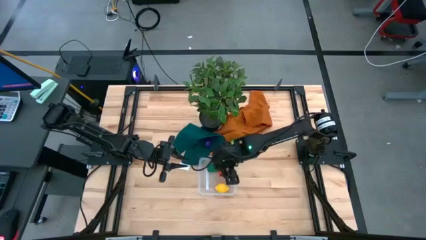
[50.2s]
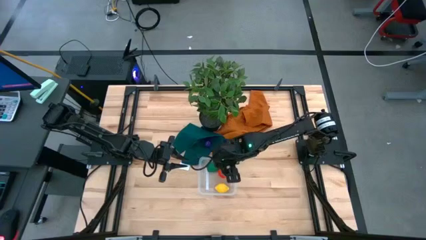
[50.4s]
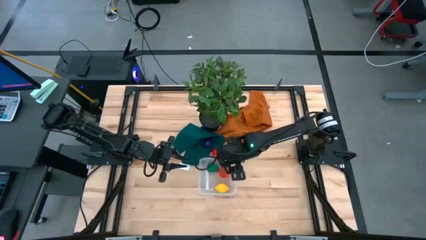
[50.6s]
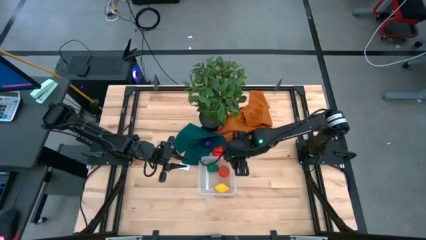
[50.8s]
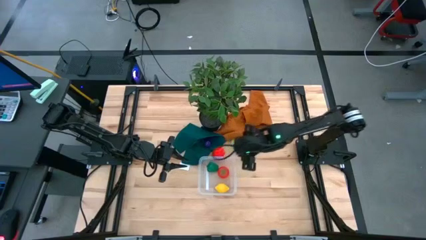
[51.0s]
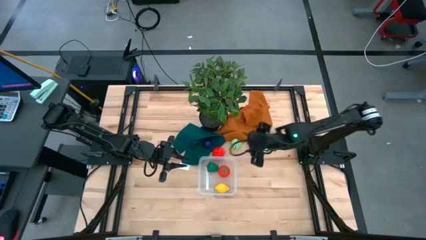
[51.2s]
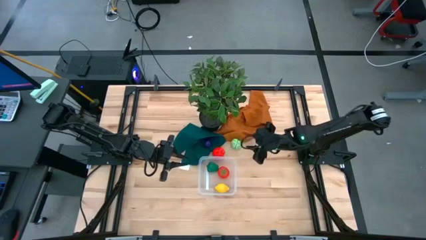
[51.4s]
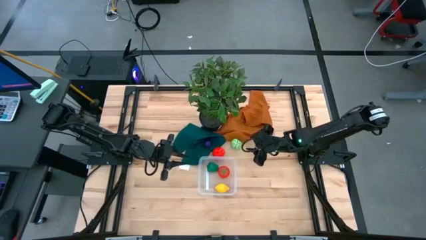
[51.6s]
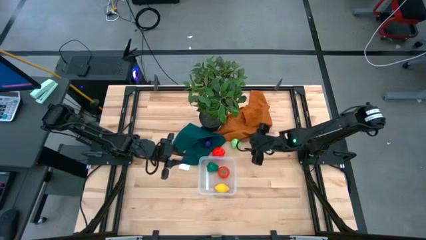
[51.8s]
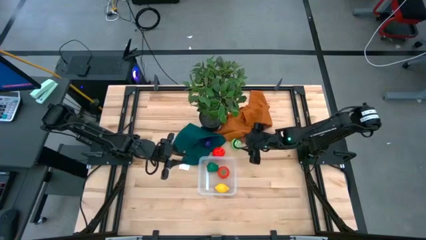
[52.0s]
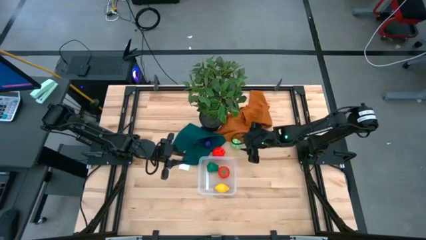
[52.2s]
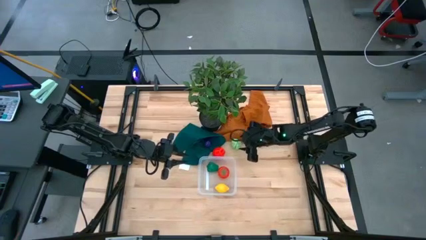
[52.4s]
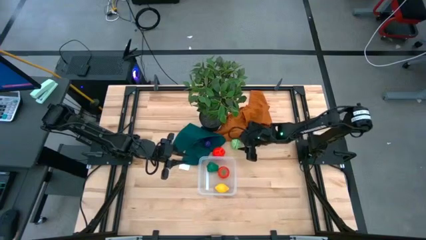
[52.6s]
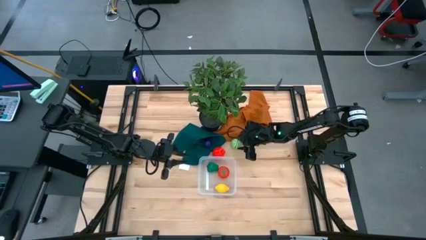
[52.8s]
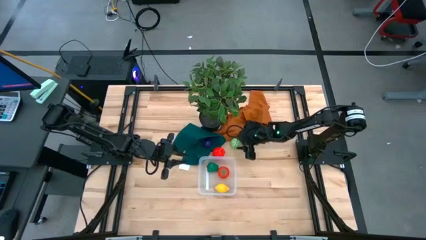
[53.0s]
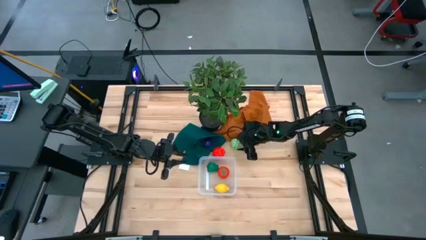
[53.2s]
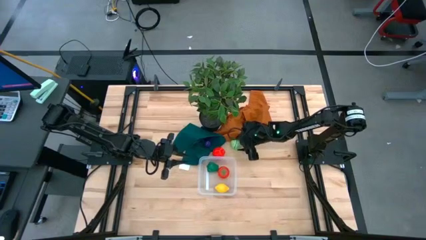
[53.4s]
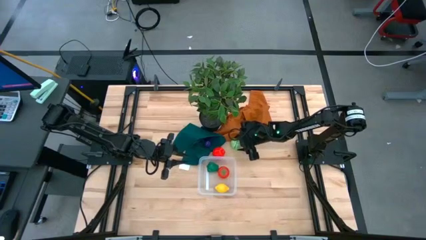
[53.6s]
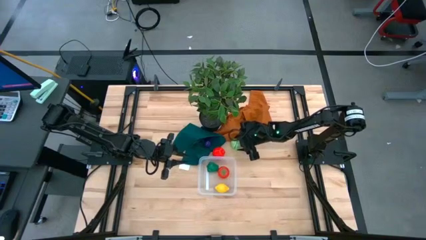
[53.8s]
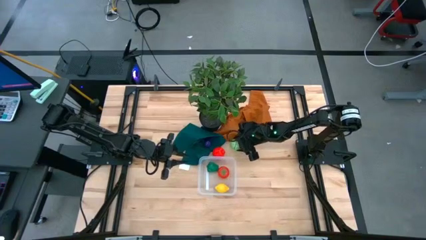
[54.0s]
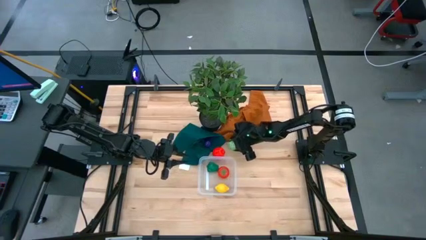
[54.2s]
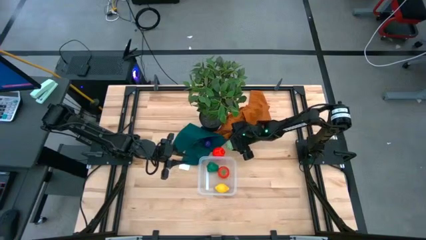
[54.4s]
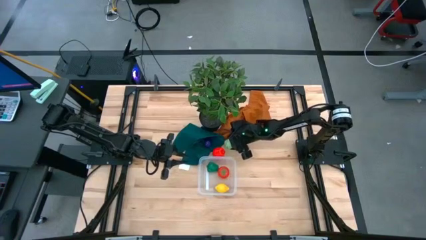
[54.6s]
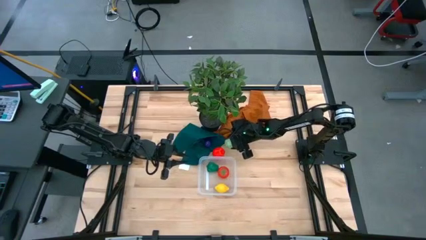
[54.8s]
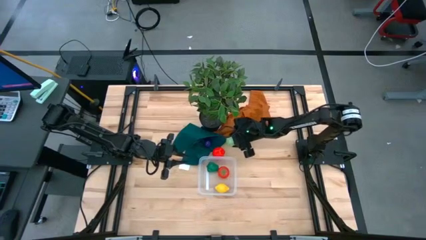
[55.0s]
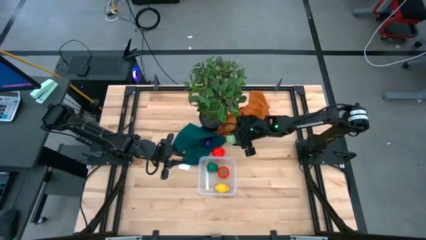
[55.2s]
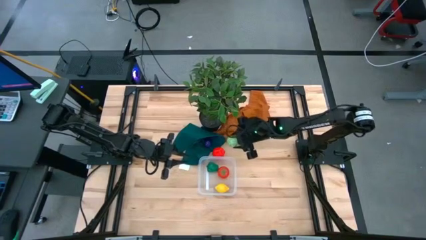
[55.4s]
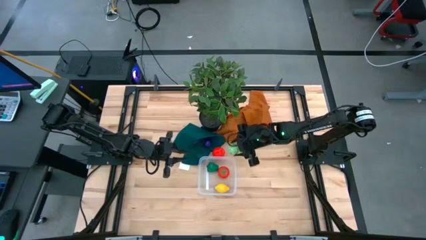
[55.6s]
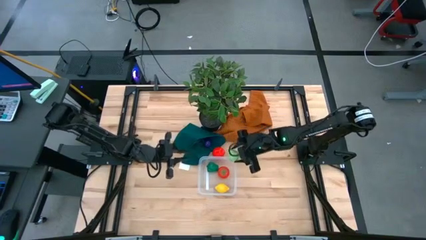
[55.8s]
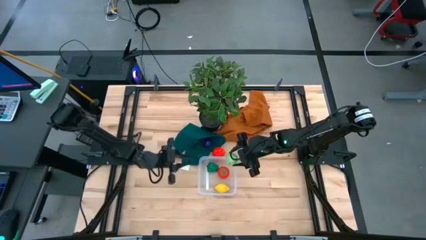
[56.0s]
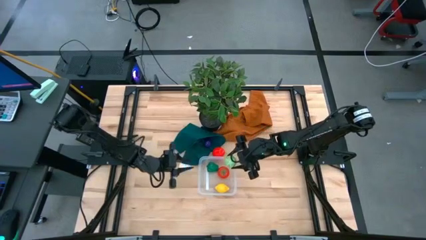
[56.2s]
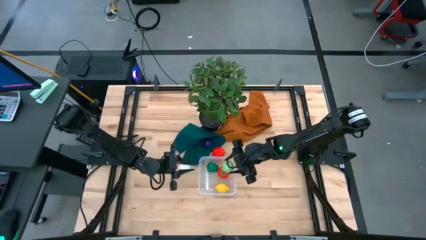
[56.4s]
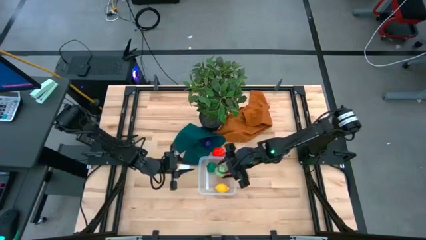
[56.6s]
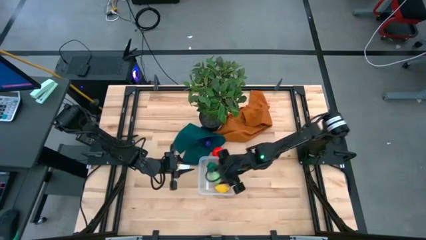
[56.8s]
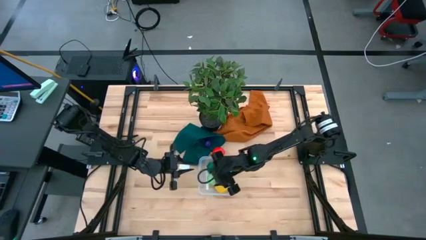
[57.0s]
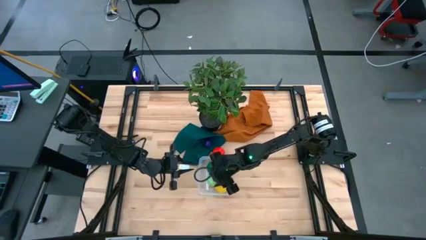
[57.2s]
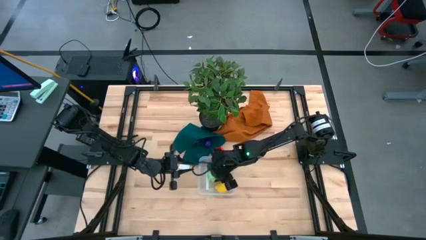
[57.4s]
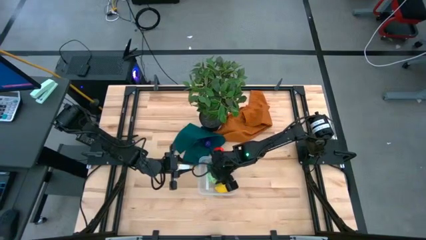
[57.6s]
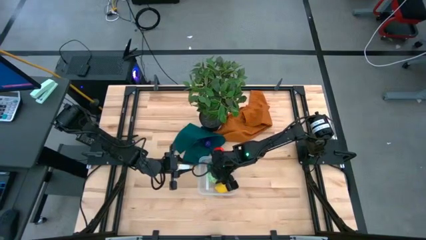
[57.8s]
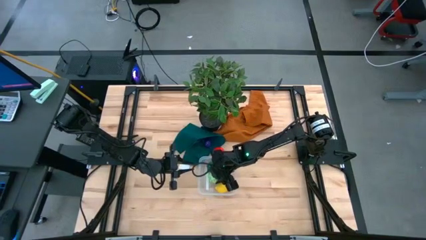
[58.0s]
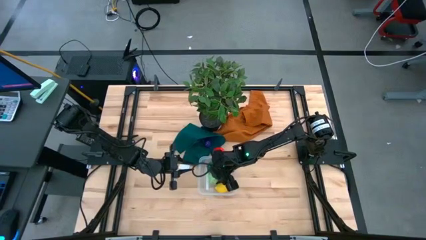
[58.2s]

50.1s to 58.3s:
Task: Pick and placing Produce into tupperware
Put the cabbage into the transparent bin

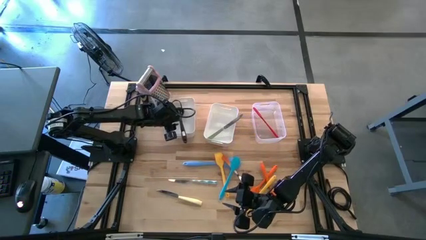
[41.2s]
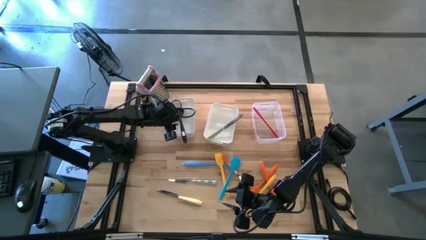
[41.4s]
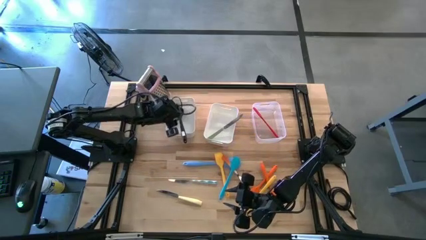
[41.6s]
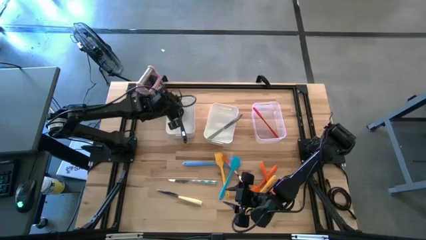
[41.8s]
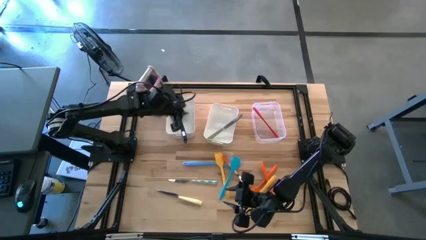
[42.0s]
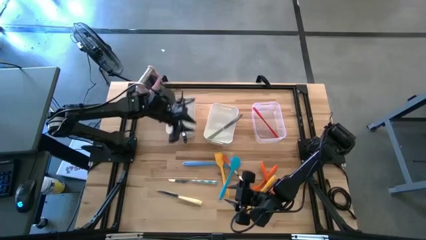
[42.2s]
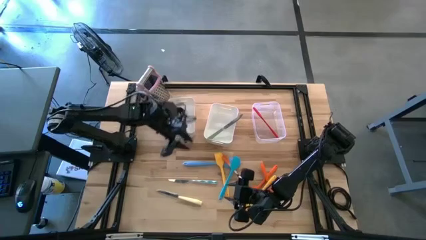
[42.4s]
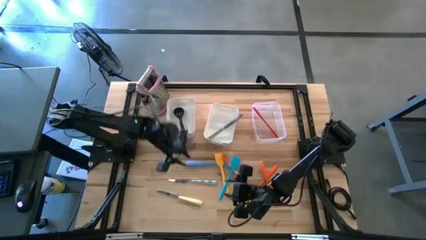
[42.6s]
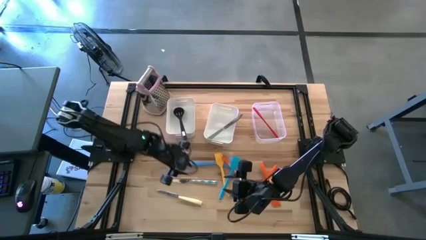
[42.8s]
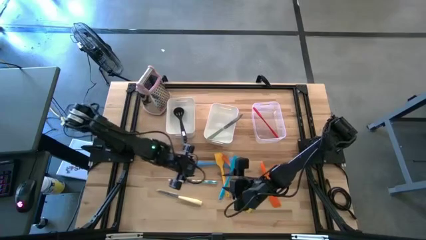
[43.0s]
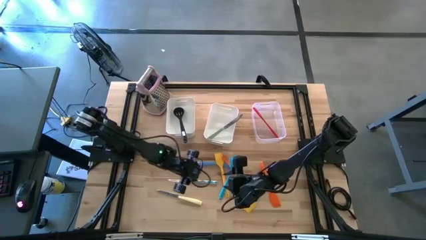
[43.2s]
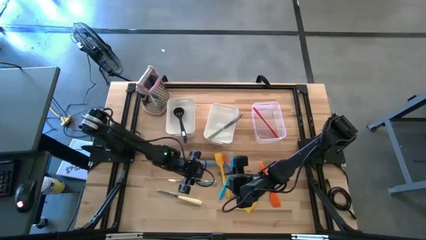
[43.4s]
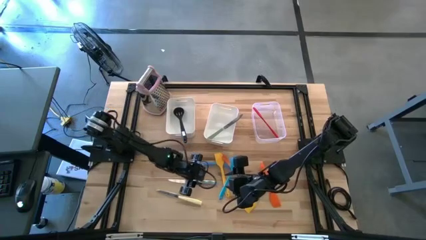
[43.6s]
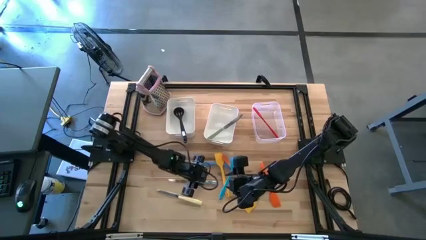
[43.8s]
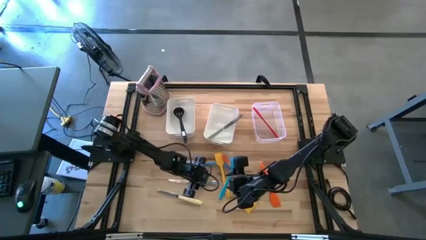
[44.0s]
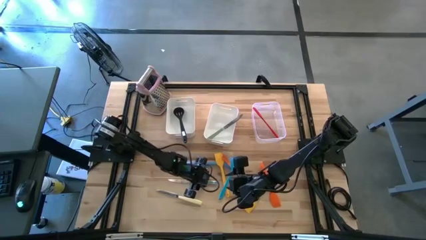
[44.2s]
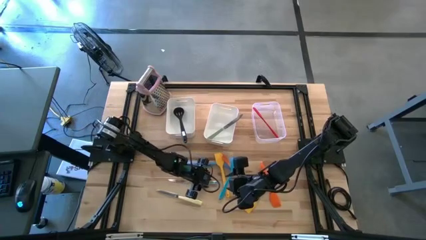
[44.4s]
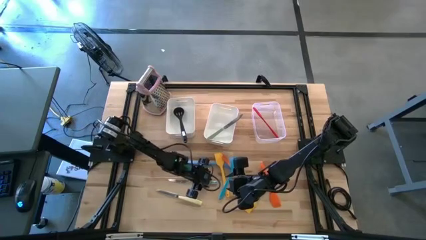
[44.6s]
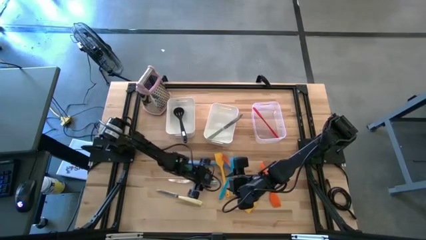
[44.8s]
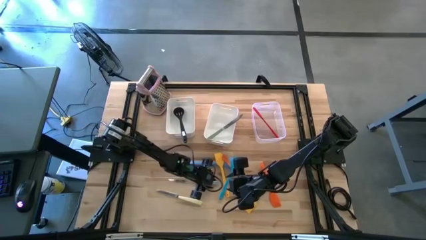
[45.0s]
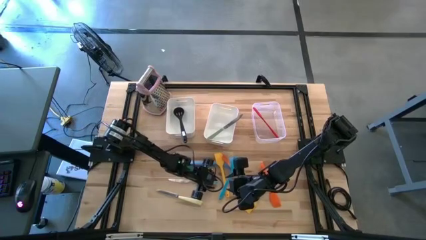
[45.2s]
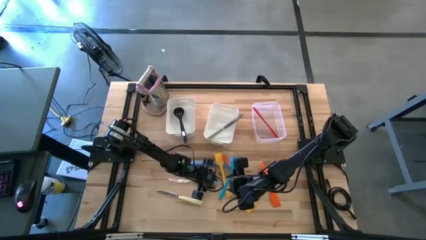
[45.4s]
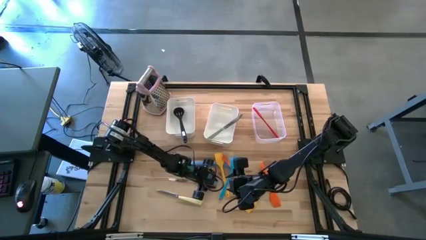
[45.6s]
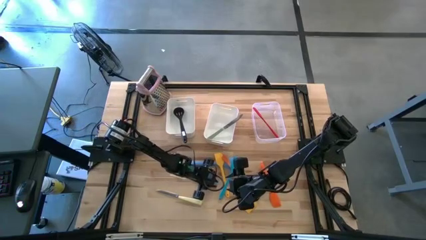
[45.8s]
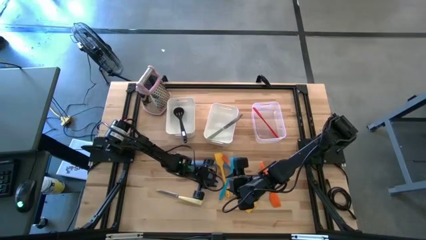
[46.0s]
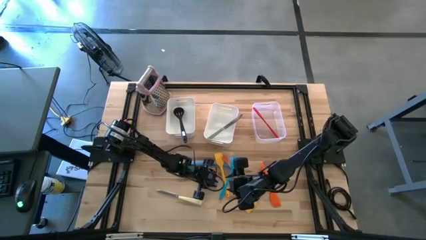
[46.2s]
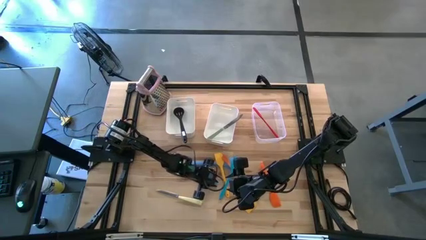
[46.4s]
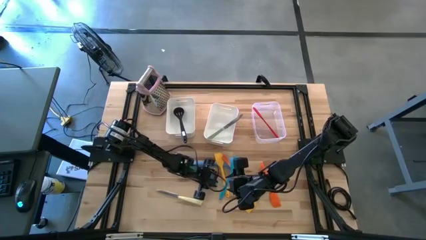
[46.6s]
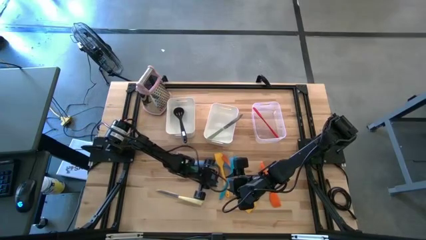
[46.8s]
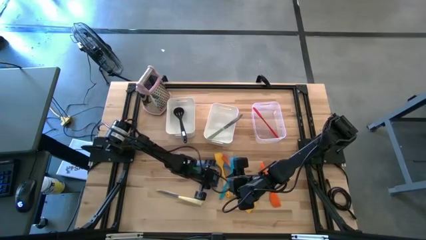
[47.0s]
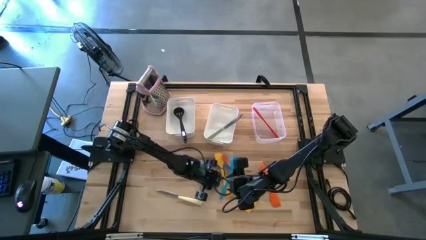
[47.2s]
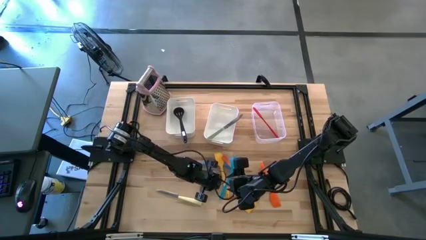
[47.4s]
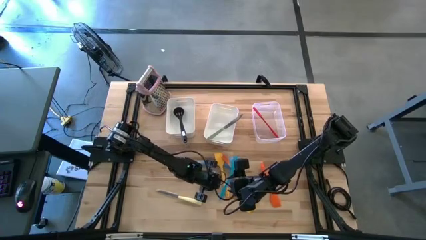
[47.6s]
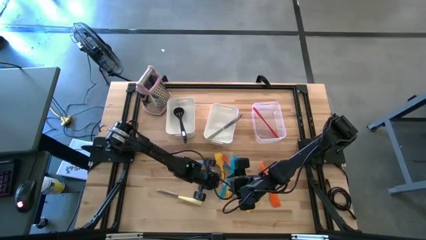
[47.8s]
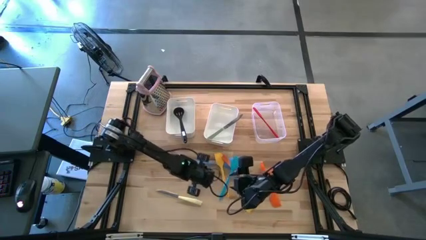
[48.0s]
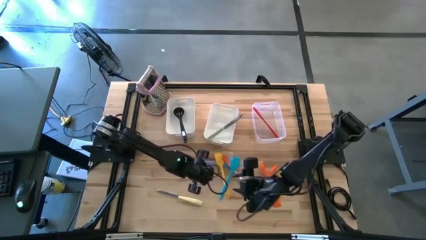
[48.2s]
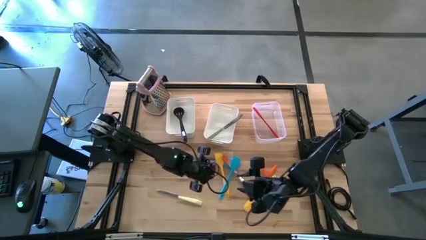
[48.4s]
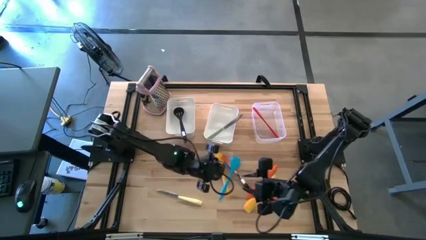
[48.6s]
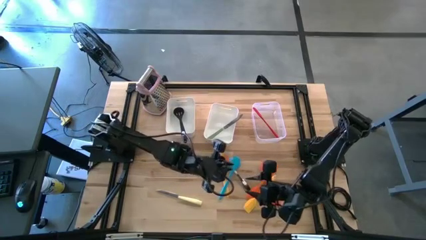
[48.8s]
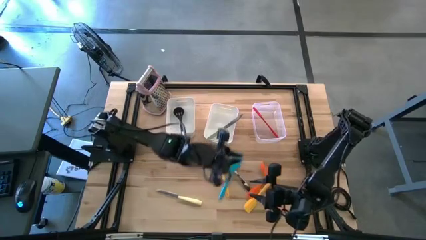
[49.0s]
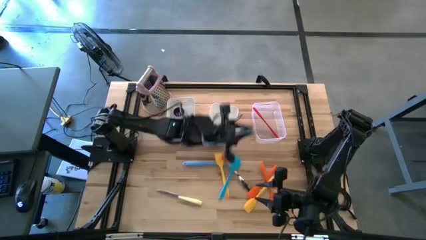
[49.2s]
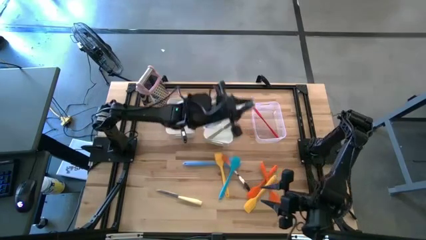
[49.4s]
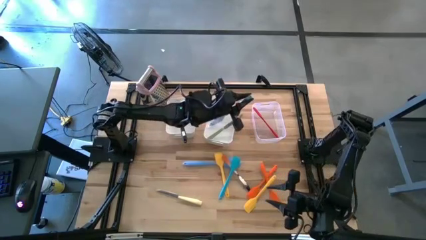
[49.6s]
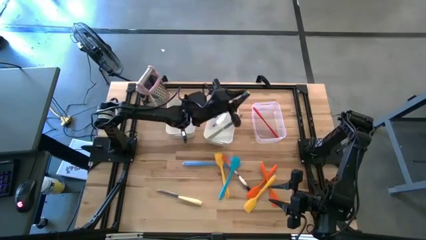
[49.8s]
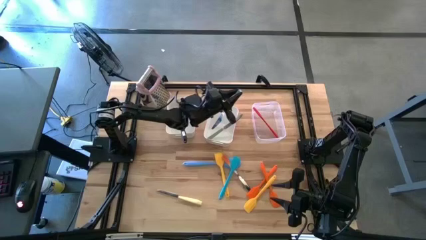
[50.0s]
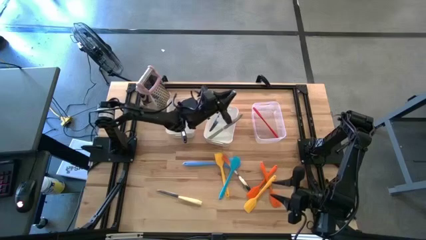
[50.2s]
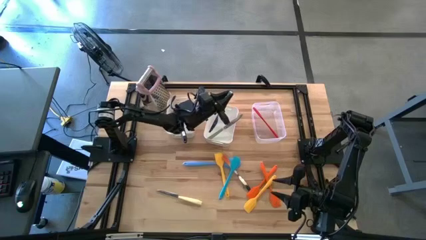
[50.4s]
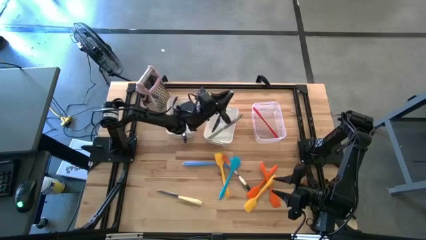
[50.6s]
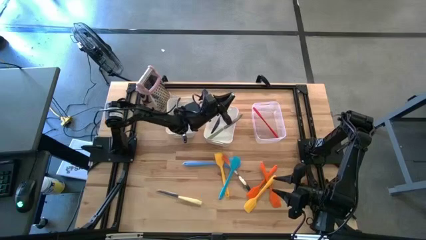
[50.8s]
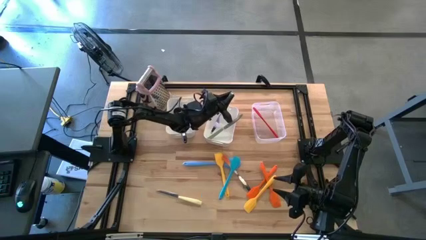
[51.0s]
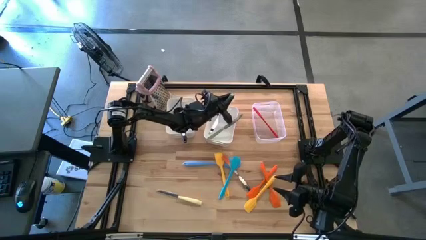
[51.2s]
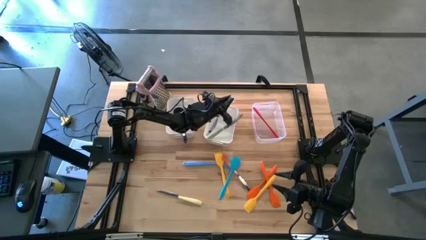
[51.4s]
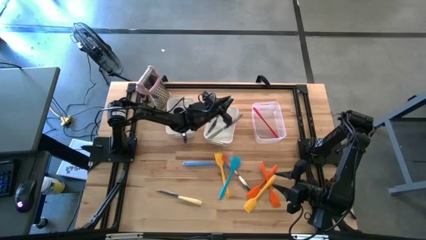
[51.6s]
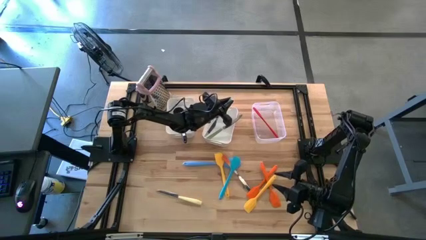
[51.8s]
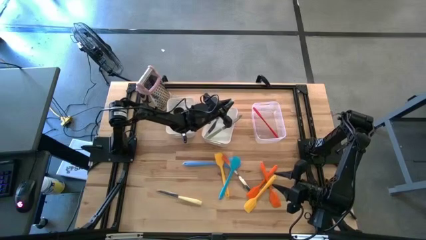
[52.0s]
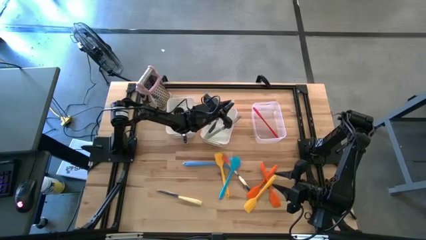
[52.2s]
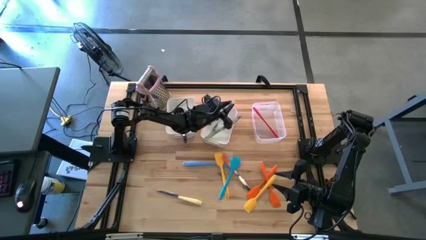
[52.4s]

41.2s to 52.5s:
Task: Pick & Place Kitchen Items
Put the green patterned table knife into the right white bin
